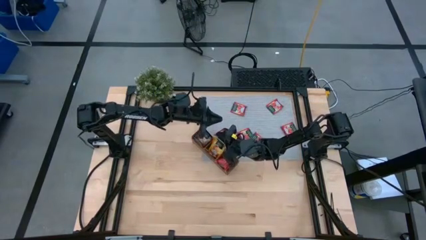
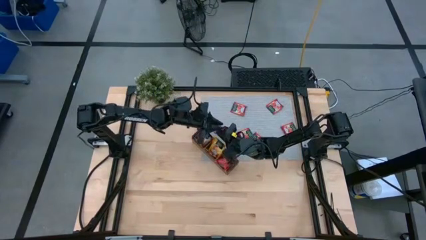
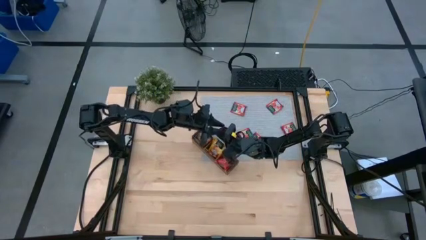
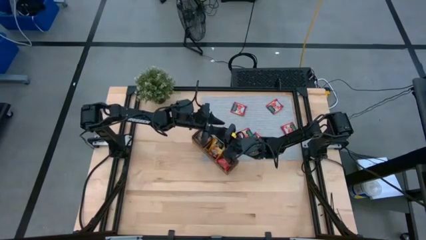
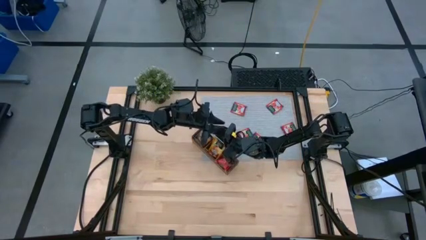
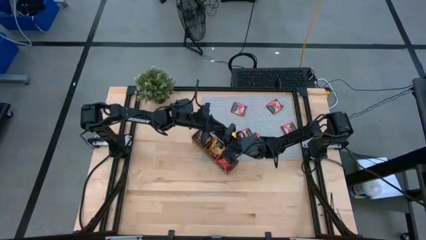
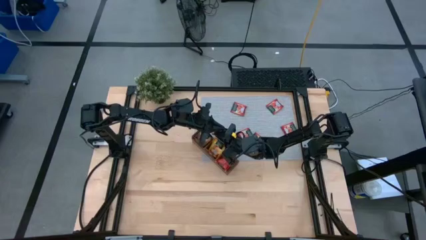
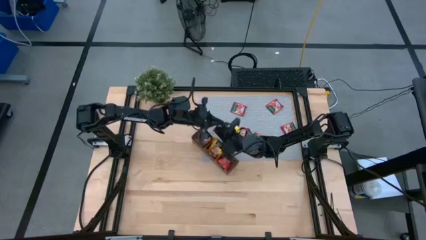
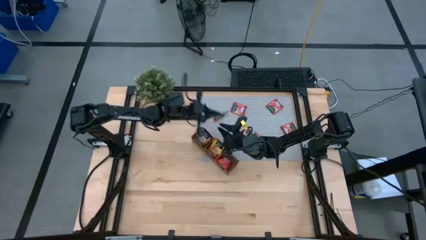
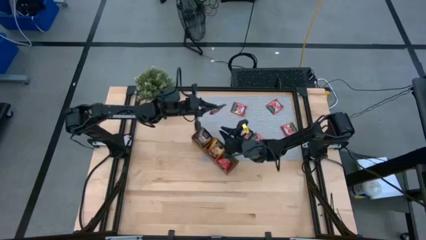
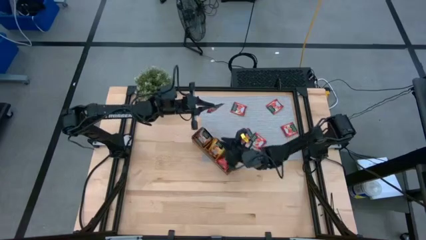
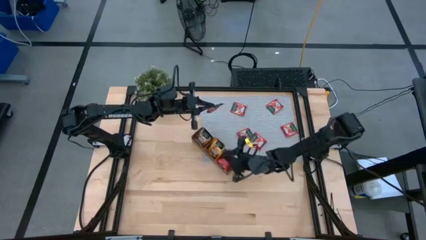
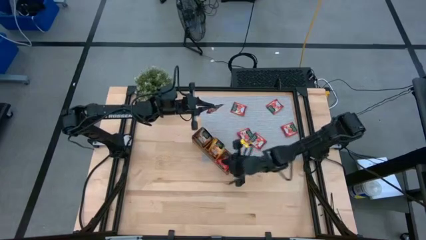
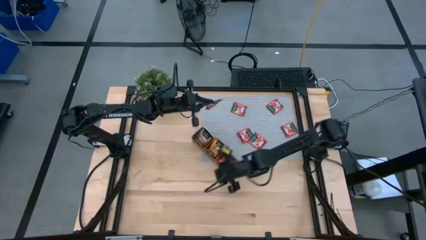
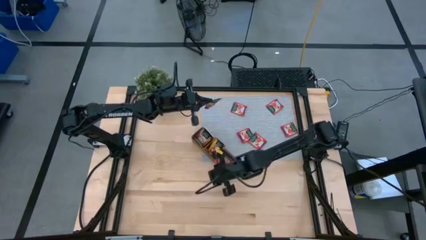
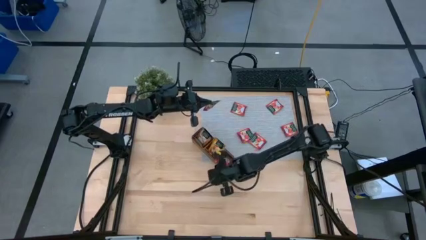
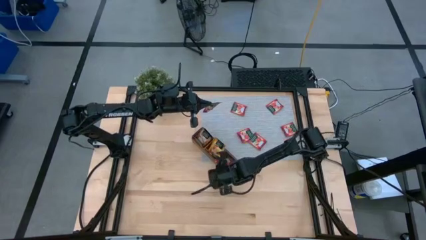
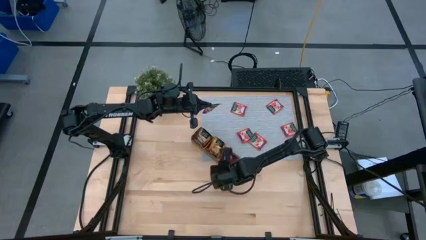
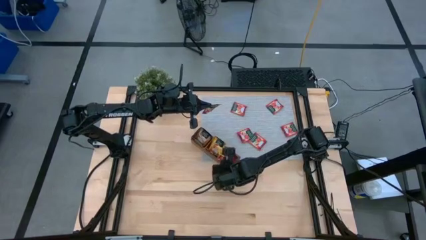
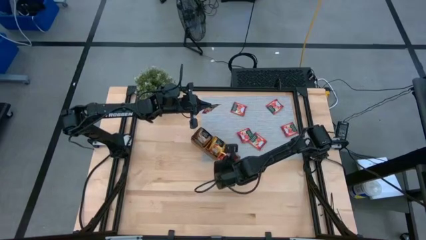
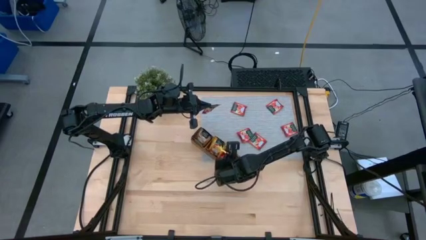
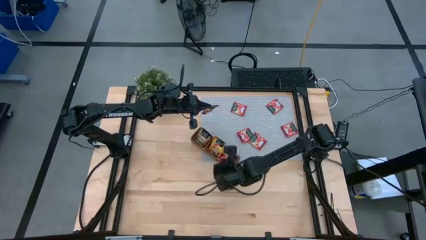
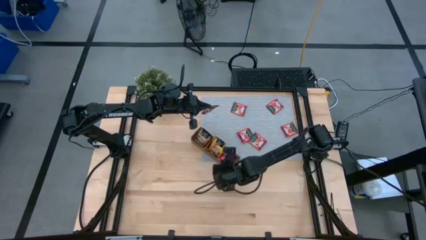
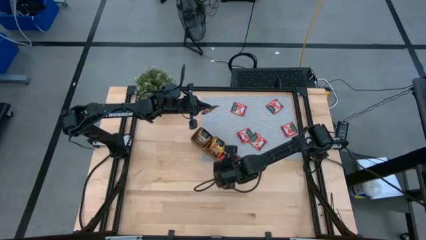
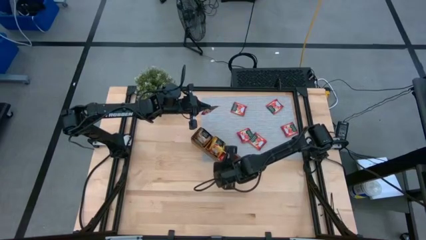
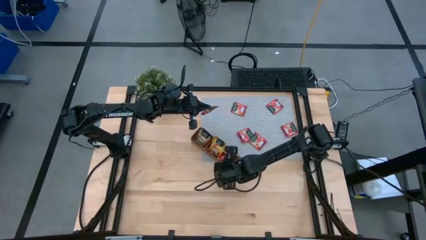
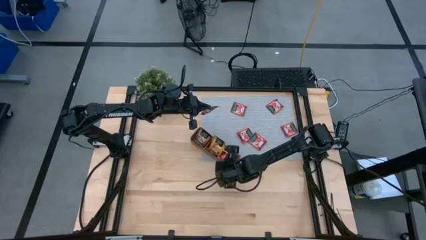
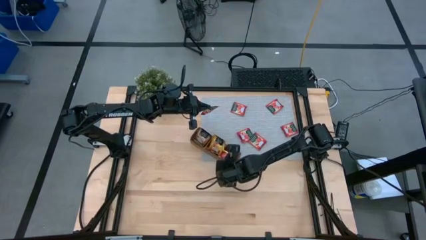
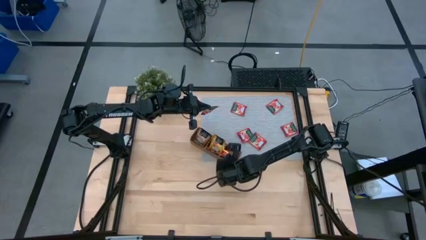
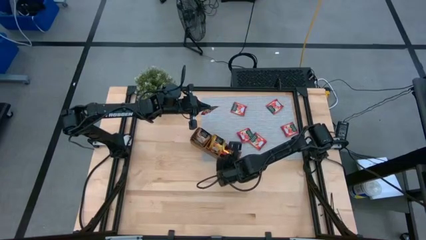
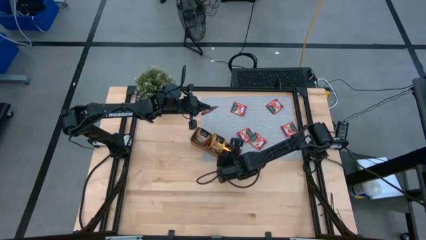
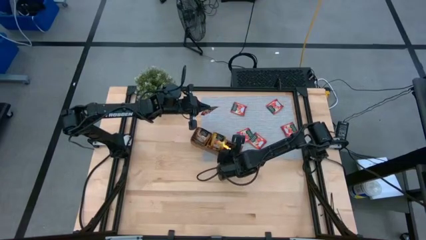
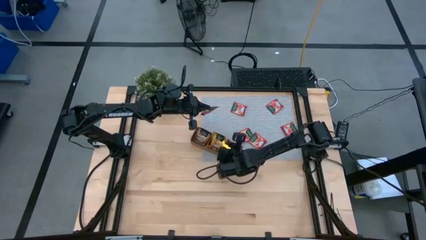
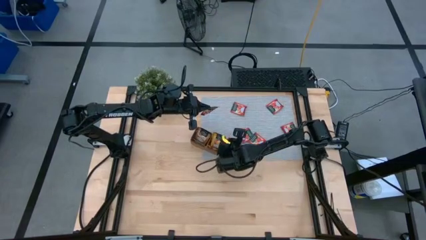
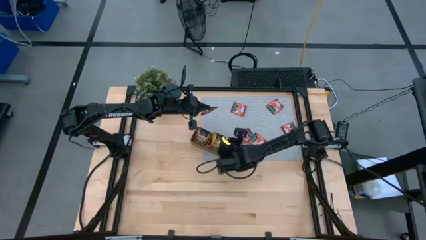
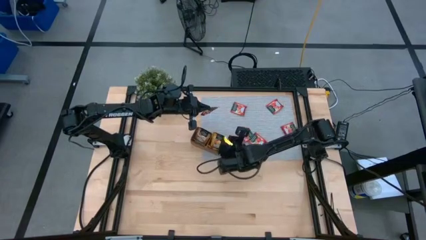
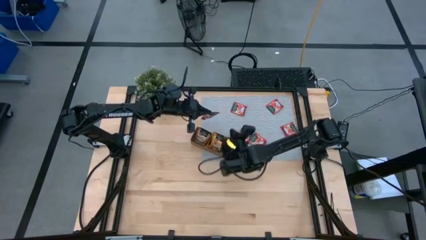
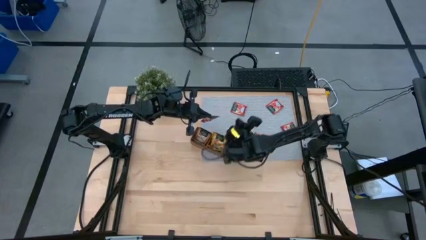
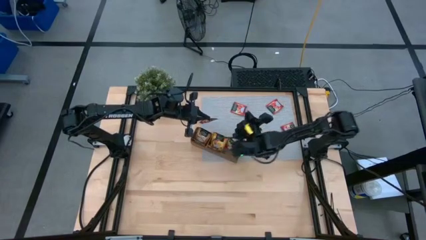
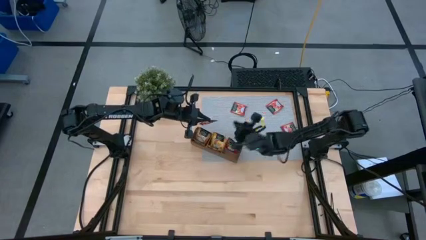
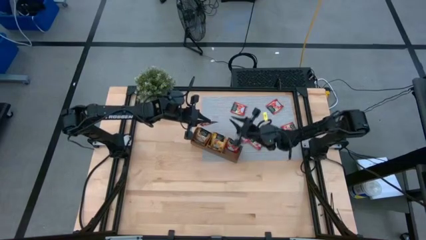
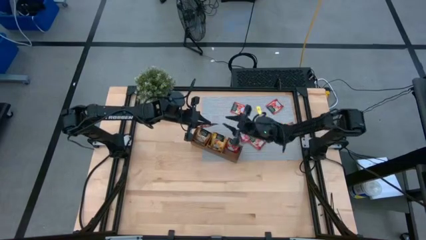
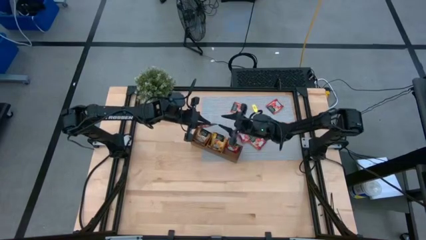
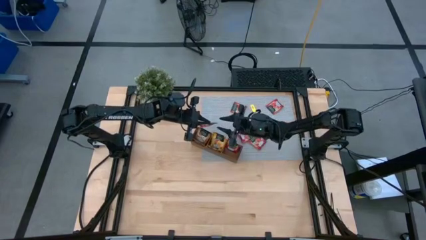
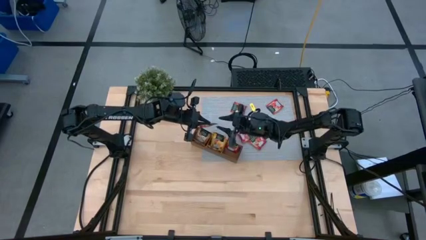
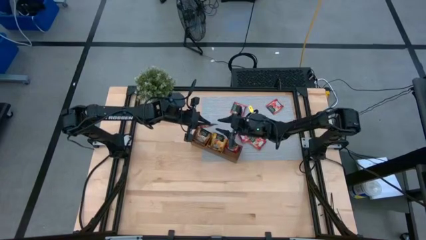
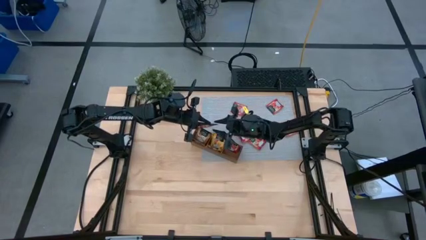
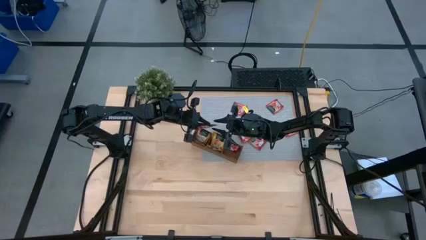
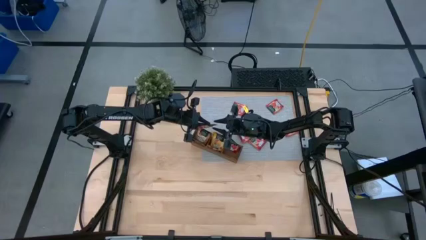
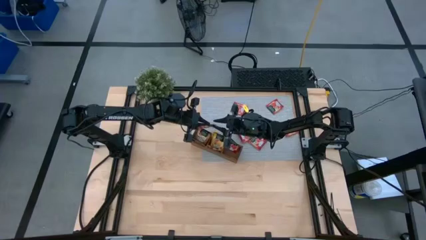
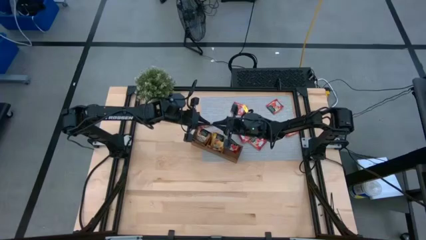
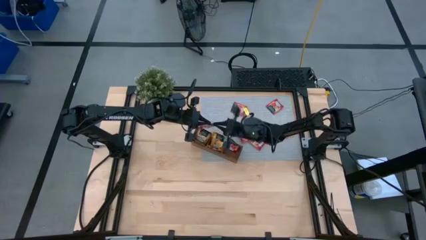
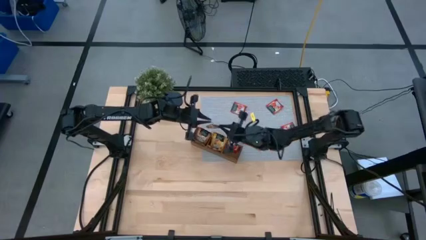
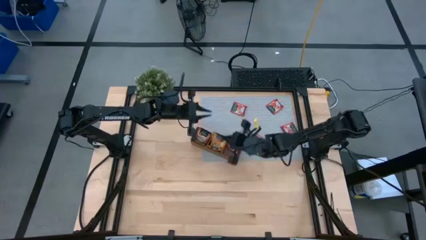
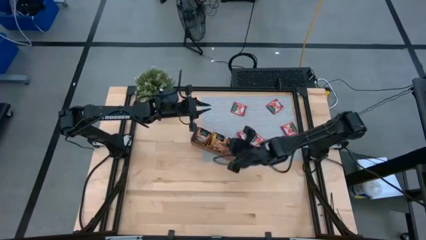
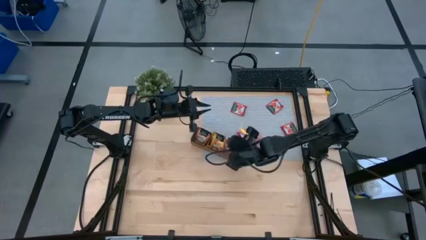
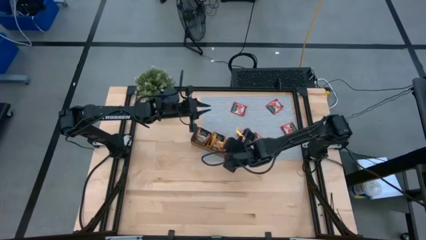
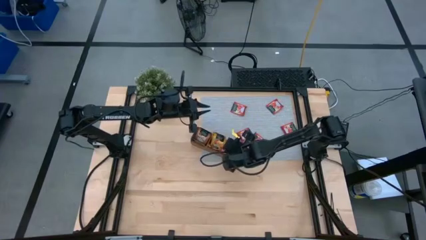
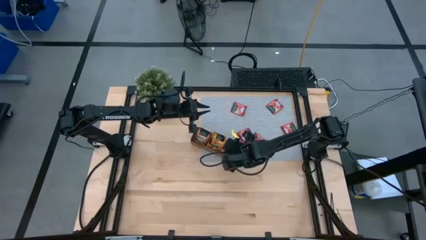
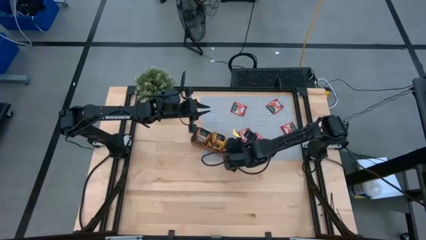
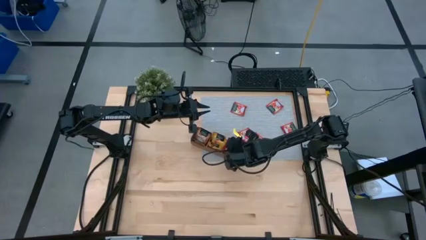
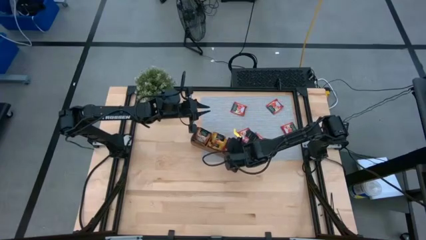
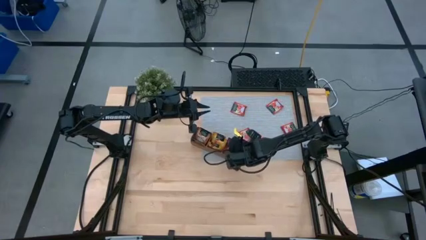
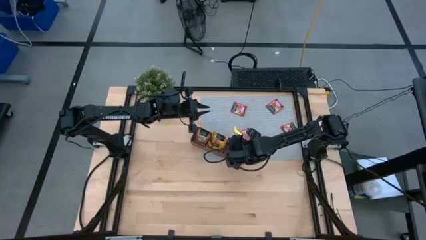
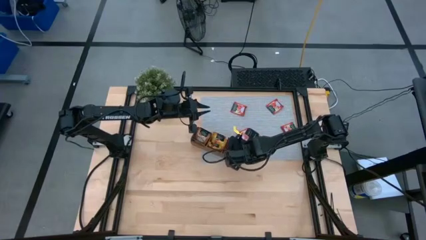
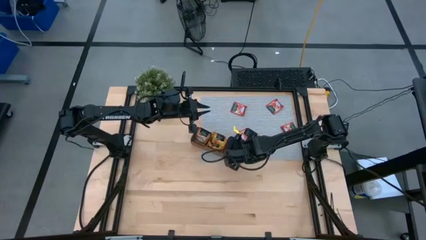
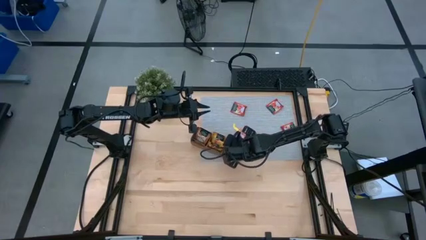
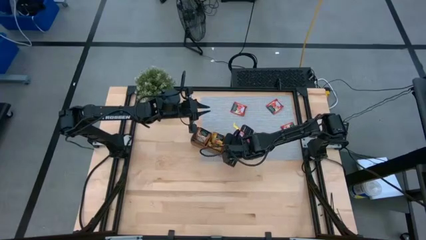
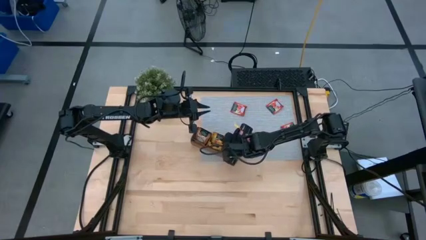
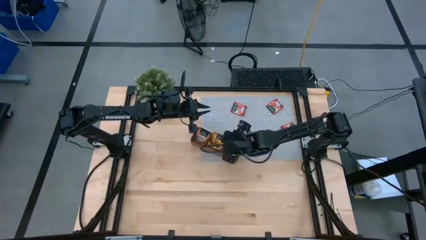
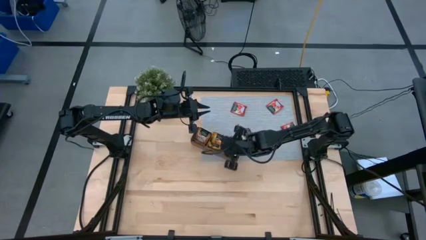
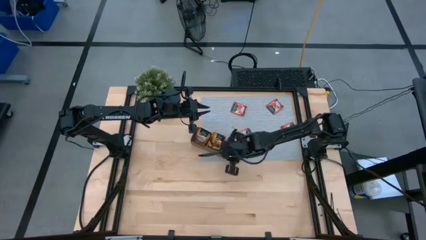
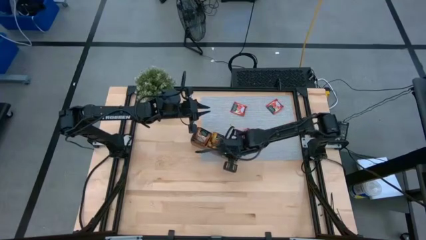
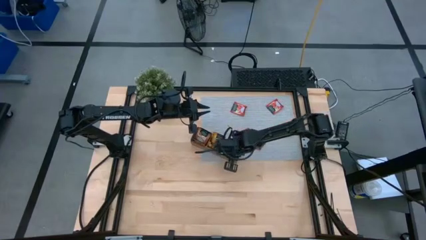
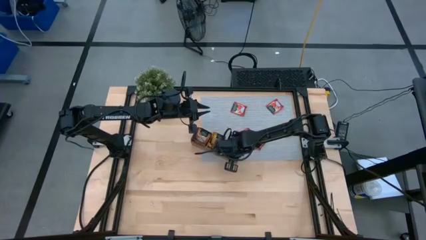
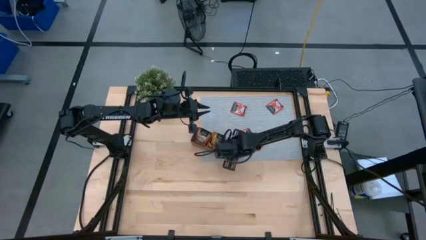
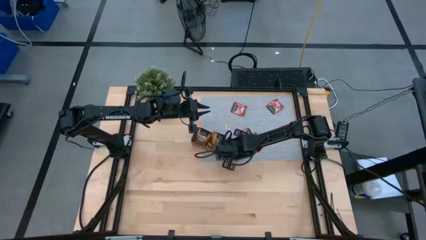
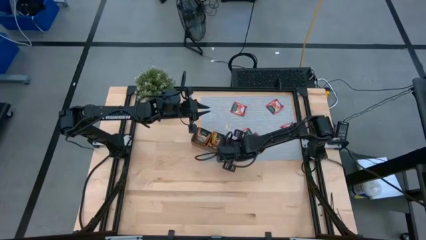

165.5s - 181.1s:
Task: Pick & Place Tea
Put the red tea bag into the right section of the wooden organizer
